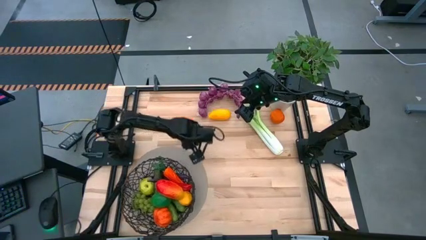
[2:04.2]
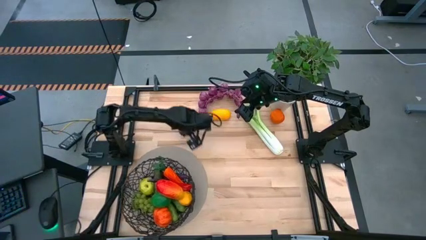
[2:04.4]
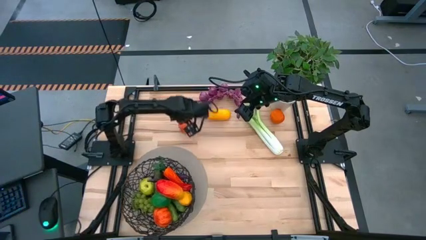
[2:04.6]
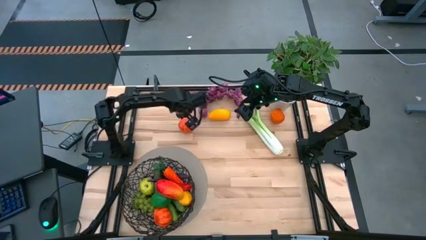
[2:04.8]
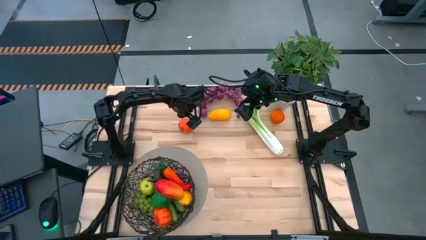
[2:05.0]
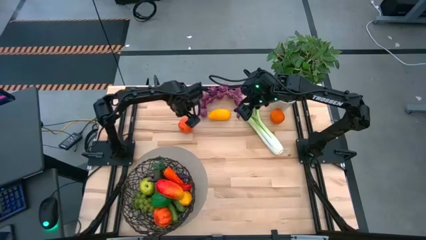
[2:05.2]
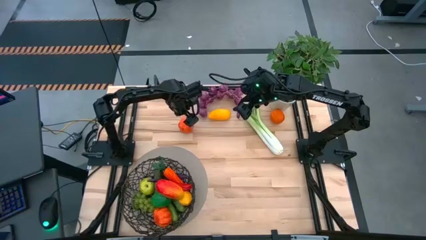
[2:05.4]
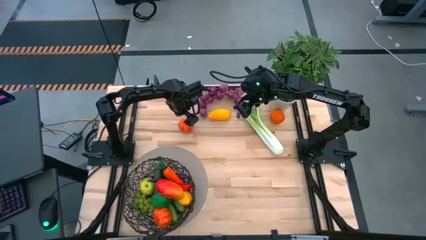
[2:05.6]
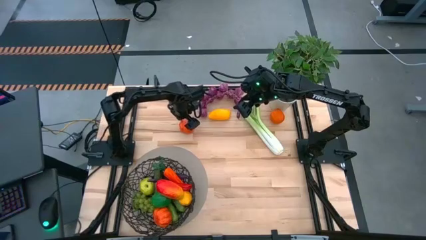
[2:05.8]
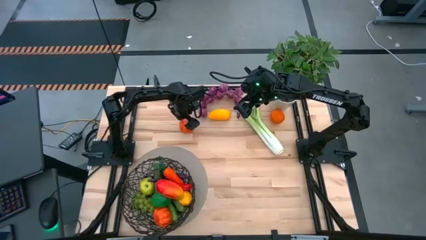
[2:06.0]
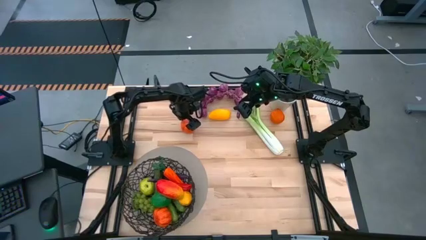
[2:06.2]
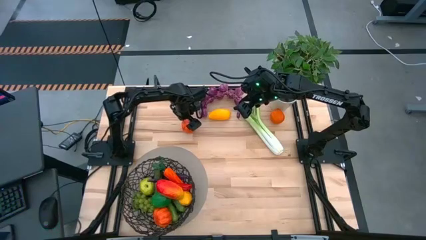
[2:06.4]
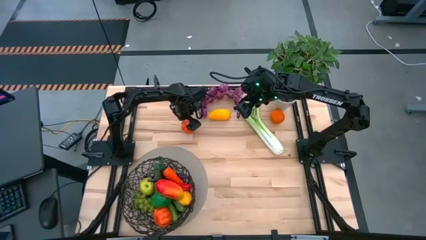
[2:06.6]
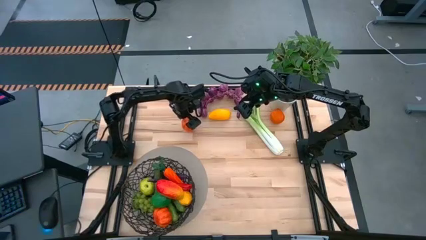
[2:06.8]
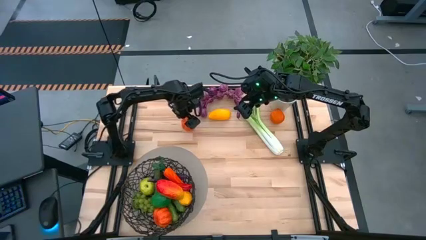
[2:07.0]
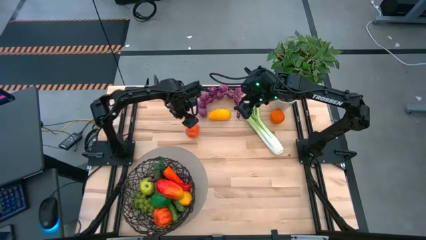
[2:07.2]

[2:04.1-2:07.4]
Task: Build produce basket
Put the orange pumpkin into the black basket

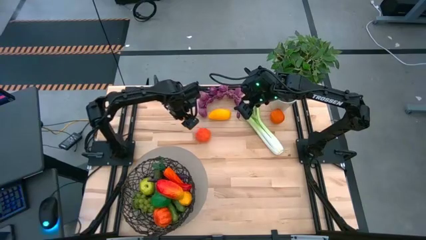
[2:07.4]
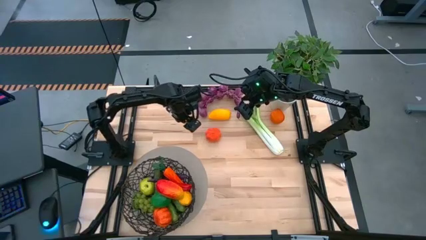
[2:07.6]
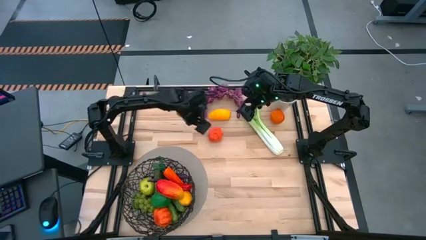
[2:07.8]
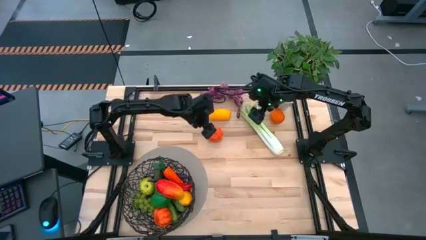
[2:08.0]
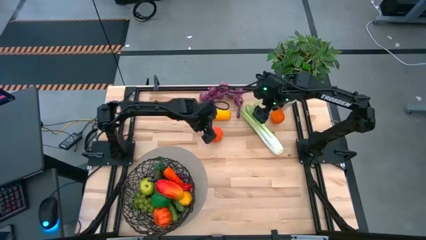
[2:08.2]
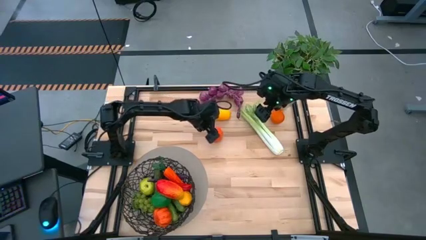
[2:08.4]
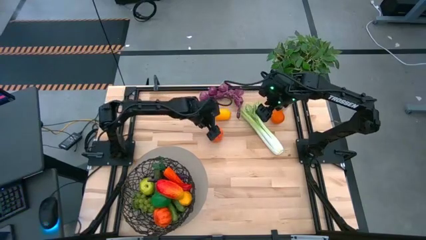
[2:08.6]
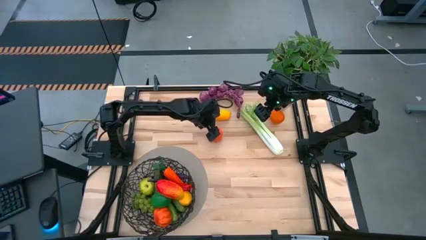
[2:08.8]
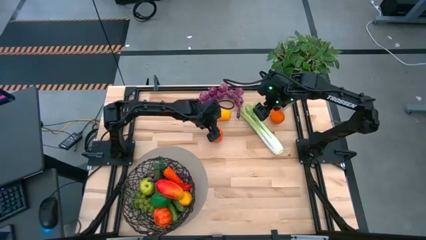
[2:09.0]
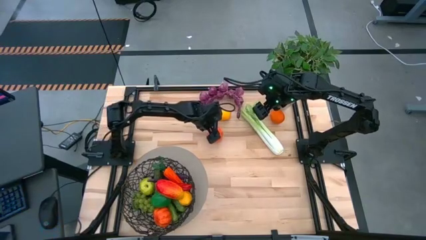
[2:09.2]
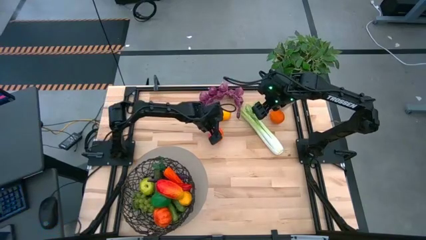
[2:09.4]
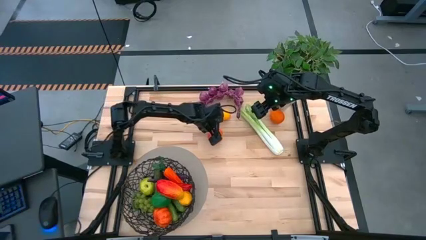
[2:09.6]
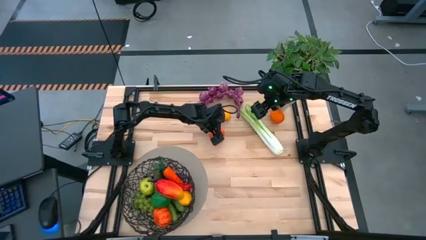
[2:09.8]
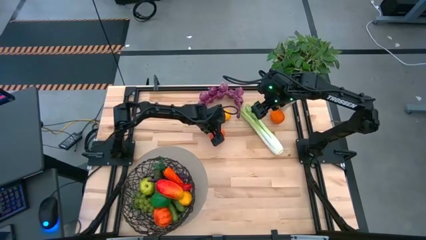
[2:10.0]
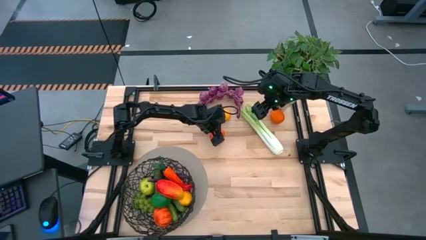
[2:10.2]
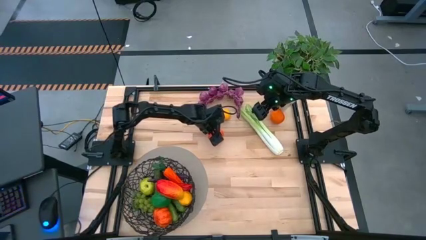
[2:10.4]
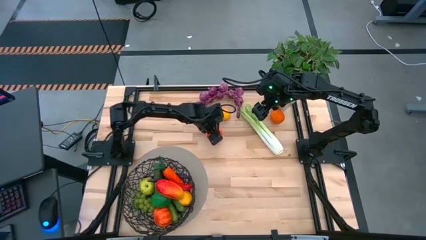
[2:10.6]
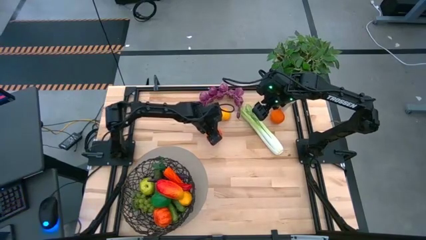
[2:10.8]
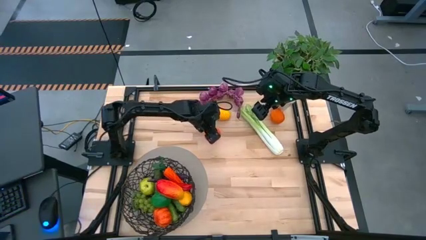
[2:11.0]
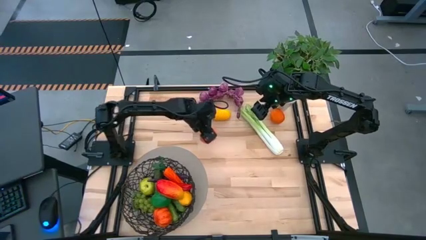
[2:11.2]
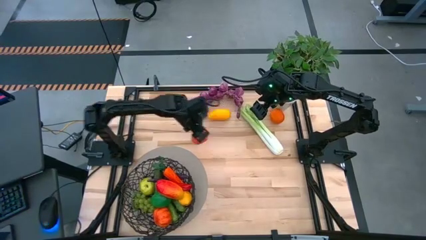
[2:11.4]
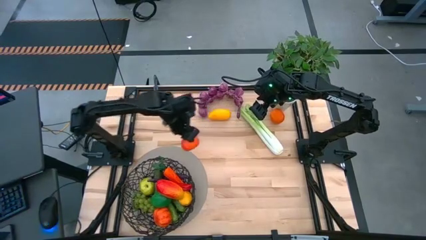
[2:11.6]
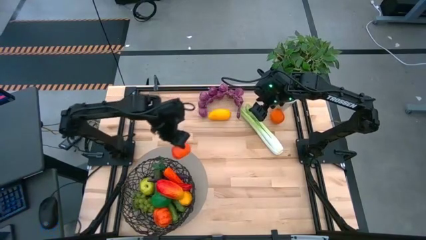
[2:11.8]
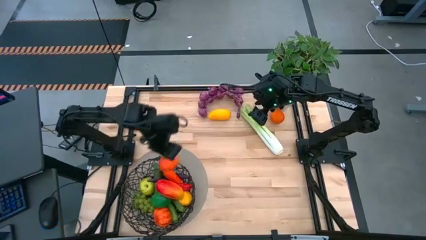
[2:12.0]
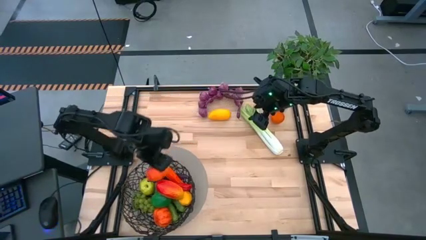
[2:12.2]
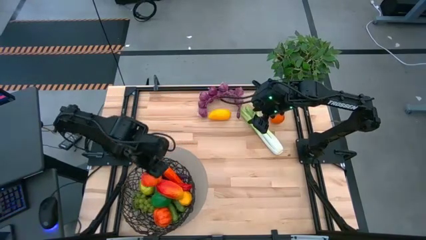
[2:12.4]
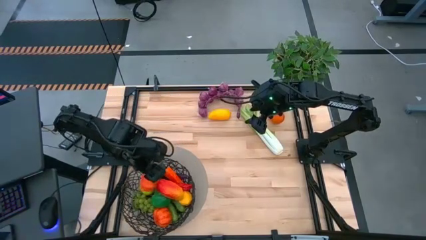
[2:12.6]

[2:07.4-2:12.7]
Put the orange pumpkin into the black basket

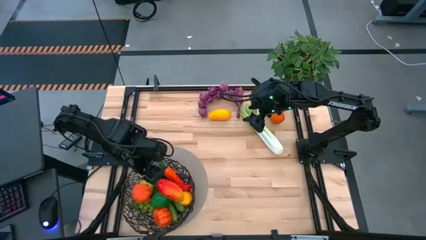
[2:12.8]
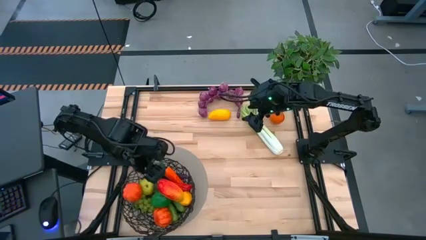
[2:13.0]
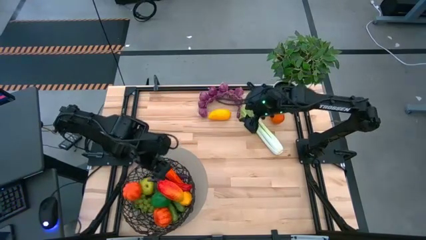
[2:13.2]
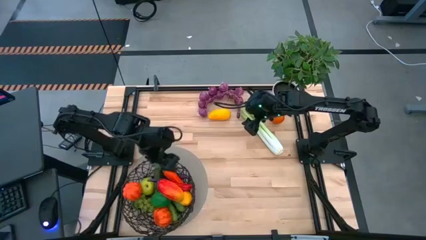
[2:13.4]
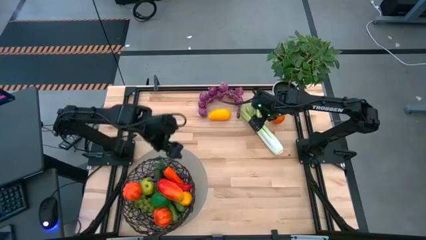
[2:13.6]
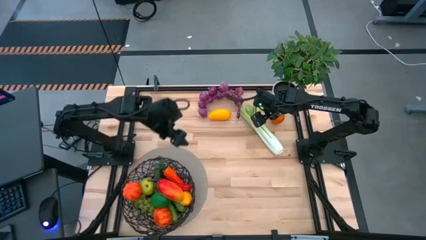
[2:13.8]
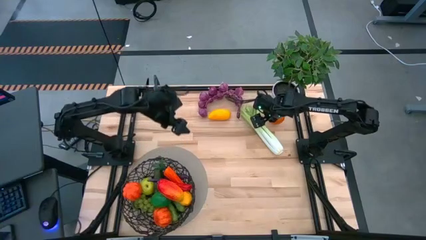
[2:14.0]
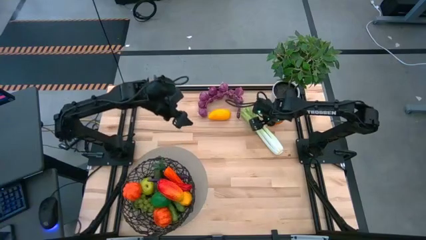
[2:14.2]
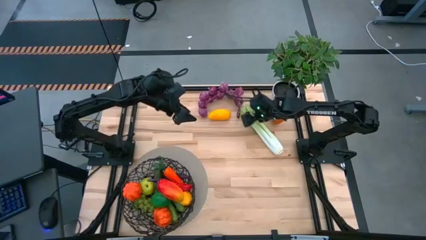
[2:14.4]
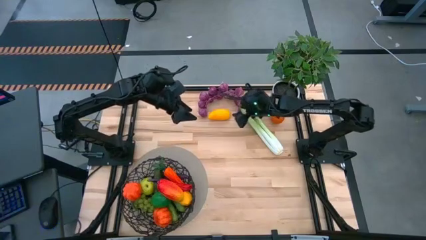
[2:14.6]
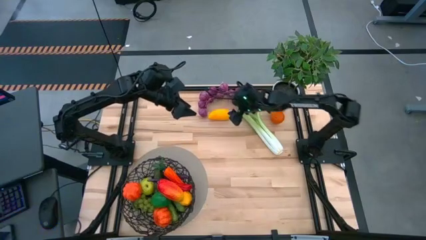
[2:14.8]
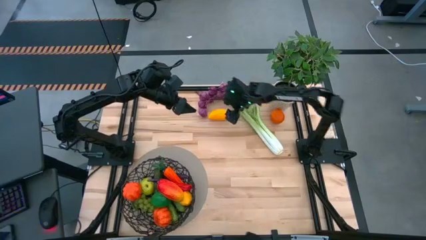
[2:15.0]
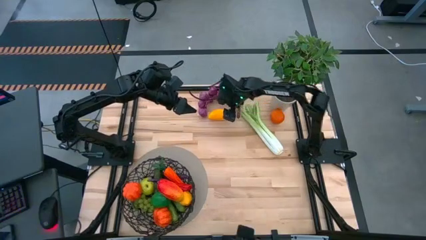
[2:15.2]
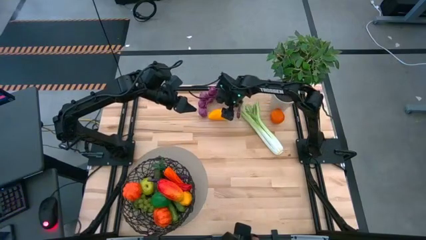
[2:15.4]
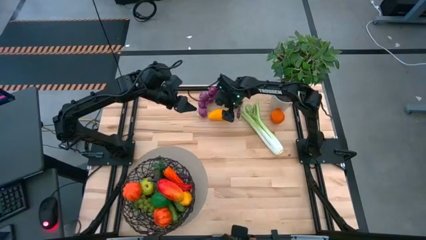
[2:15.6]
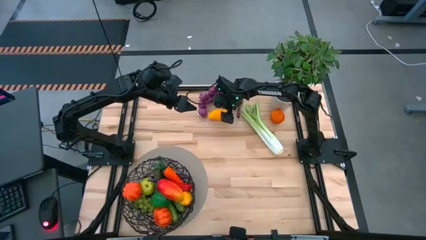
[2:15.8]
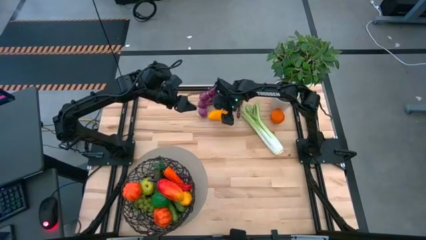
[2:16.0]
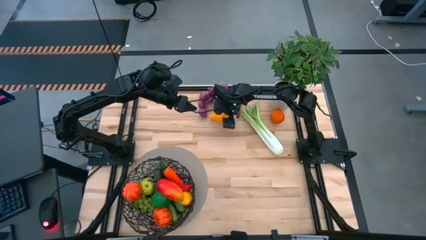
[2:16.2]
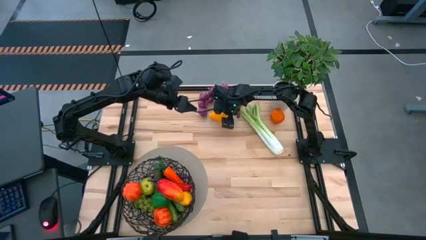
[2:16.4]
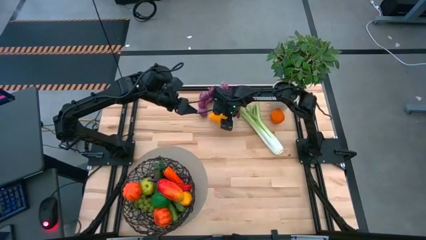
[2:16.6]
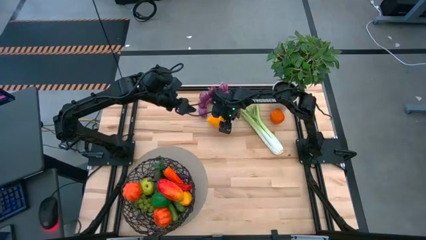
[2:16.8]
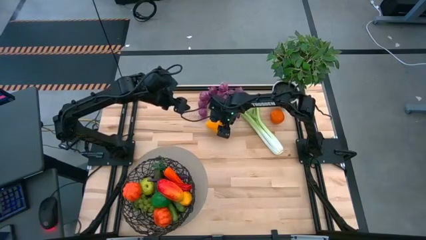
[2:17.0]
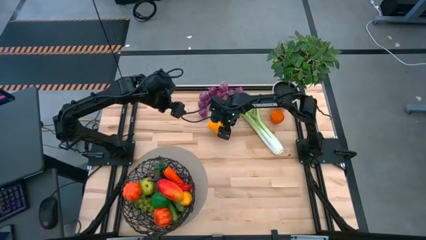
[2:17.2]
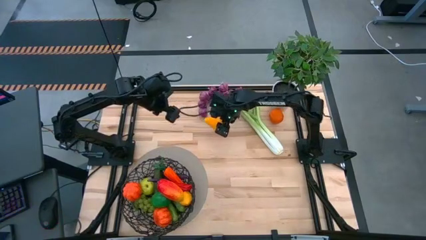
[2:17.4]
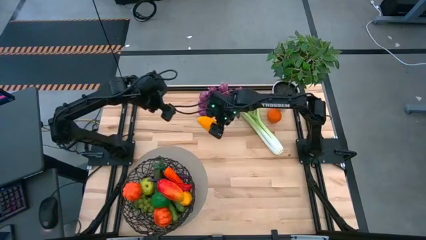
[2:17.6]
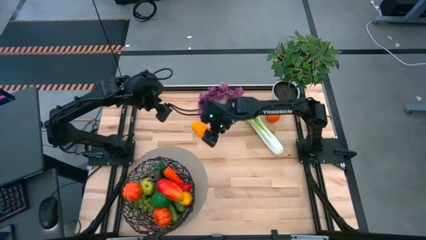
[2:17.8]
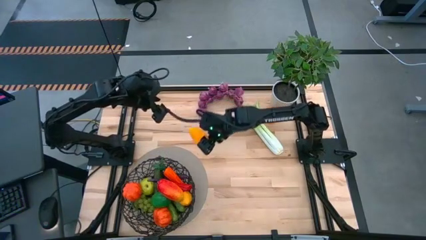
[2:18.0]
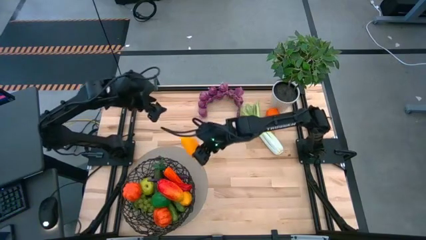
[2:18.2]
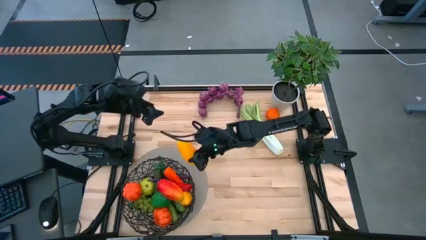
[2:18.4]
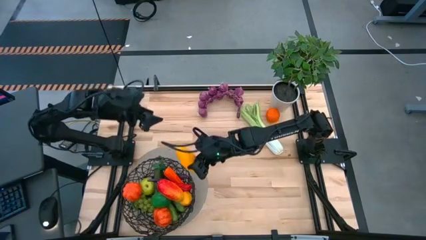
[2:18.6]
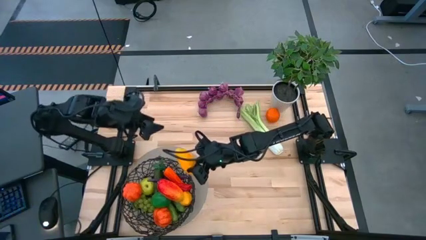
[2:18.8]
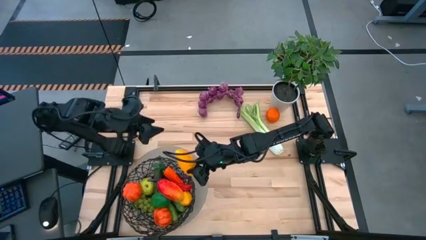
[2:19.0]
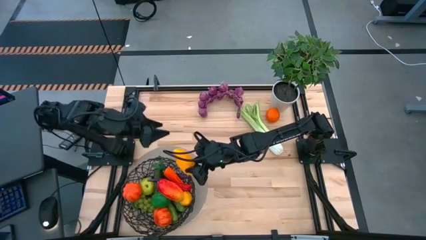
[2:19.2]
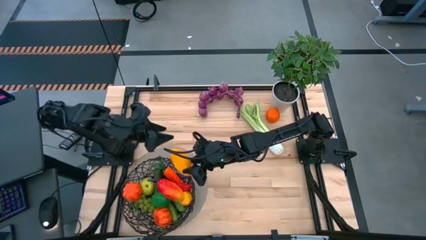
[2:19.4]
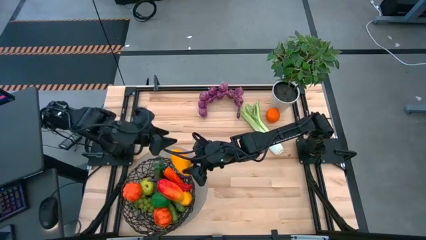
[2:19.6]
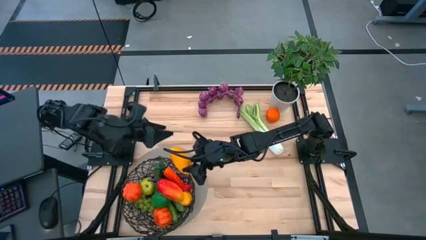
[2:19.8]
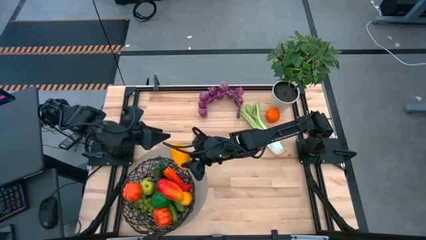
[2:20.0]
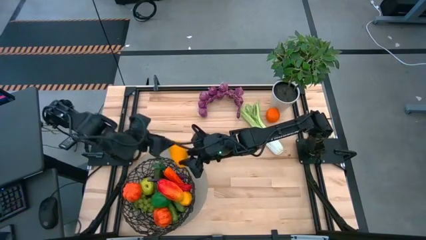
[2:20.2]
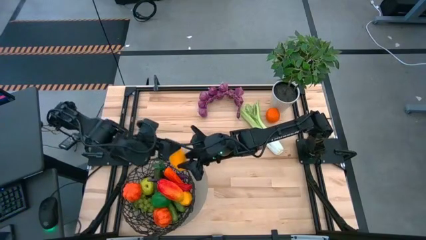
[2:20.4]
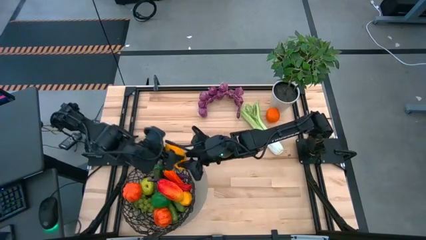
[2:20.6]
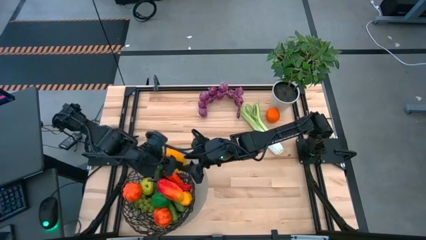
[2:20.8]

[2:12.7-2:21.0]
Put the red mango into the black basket
